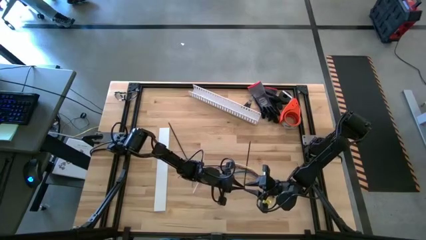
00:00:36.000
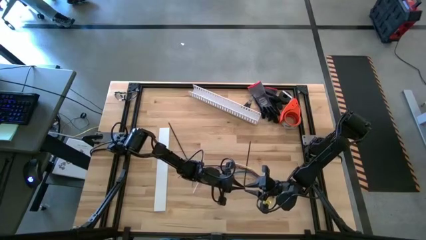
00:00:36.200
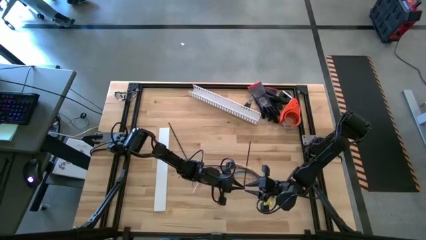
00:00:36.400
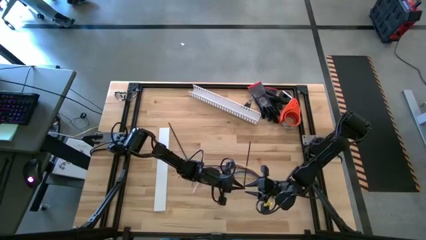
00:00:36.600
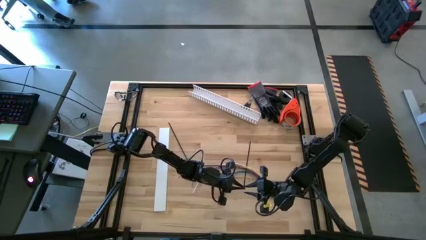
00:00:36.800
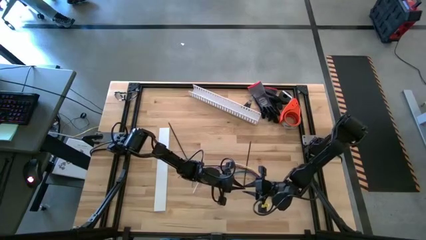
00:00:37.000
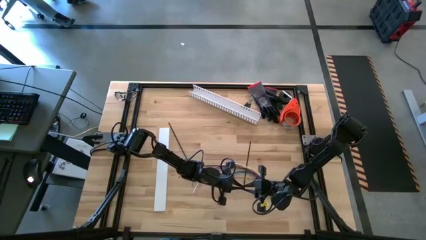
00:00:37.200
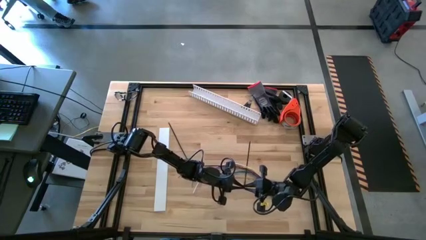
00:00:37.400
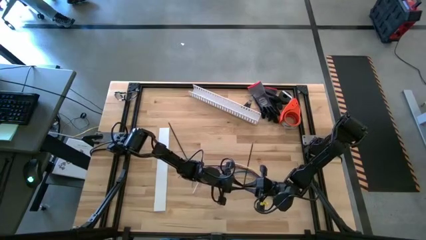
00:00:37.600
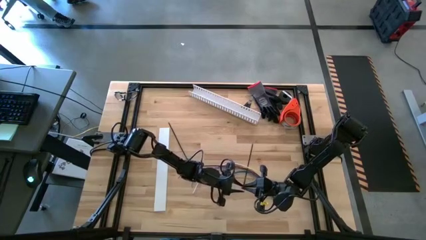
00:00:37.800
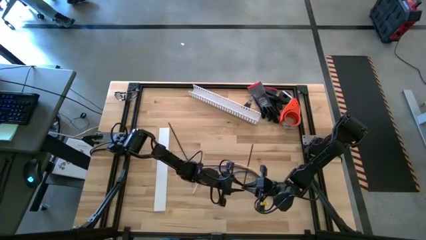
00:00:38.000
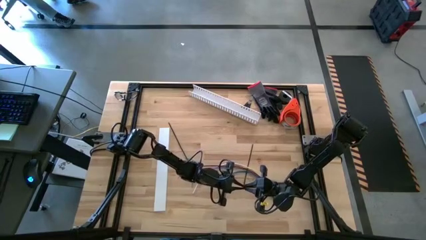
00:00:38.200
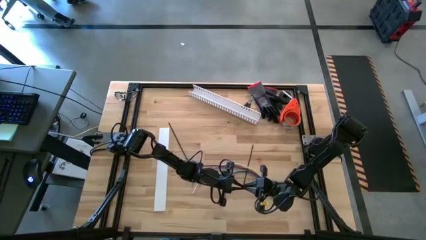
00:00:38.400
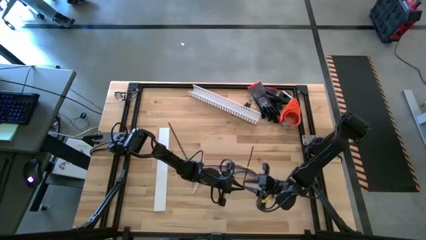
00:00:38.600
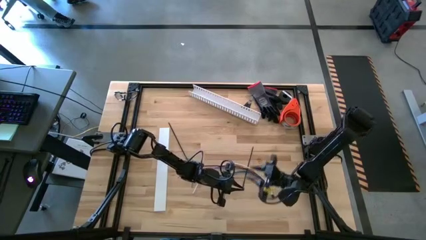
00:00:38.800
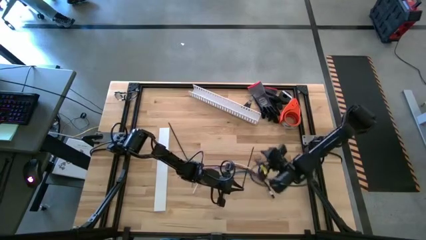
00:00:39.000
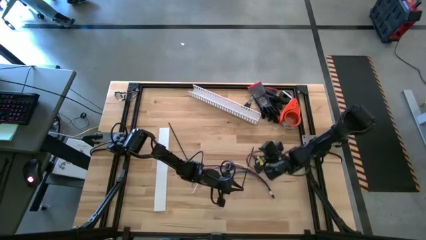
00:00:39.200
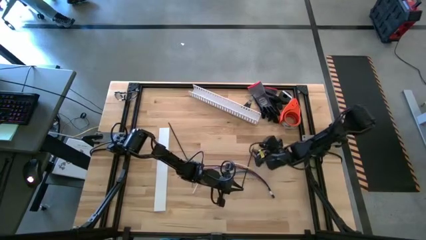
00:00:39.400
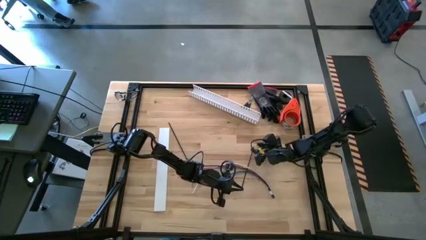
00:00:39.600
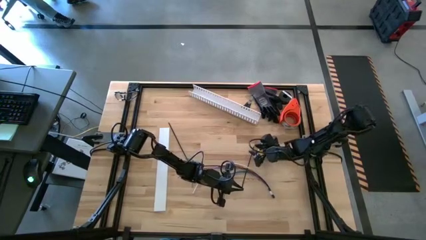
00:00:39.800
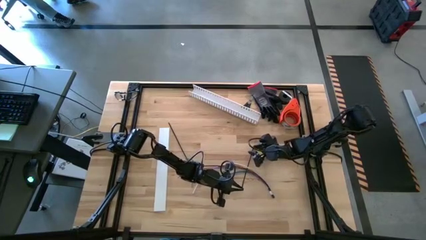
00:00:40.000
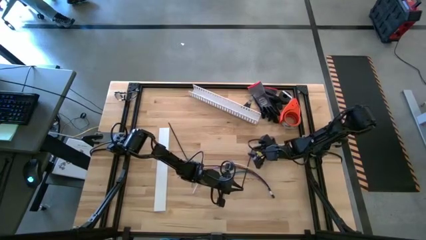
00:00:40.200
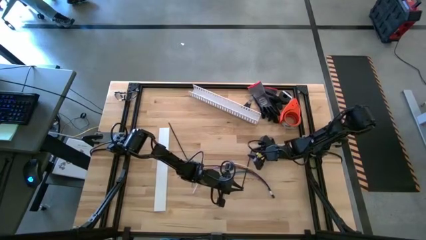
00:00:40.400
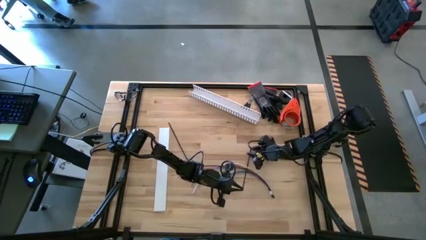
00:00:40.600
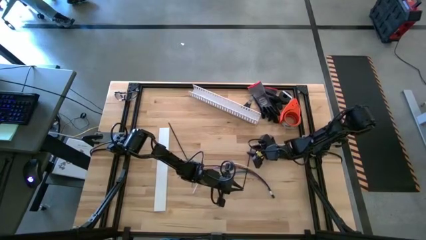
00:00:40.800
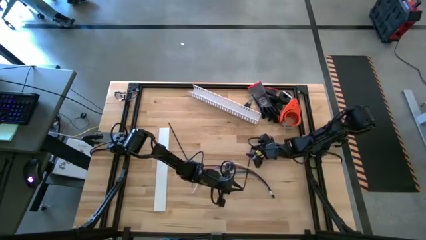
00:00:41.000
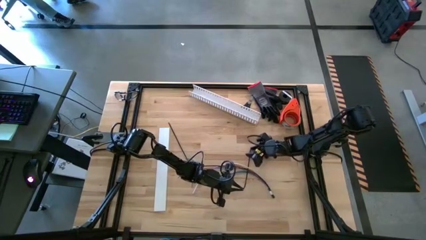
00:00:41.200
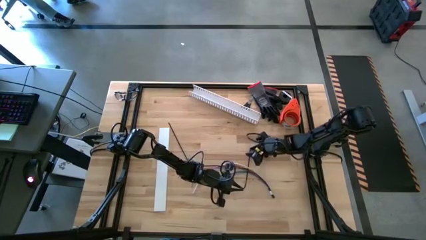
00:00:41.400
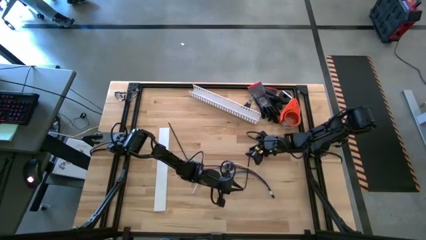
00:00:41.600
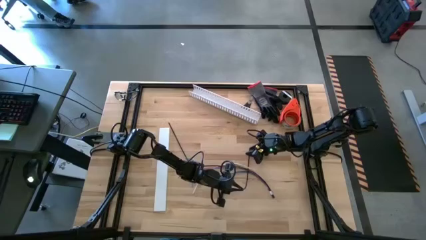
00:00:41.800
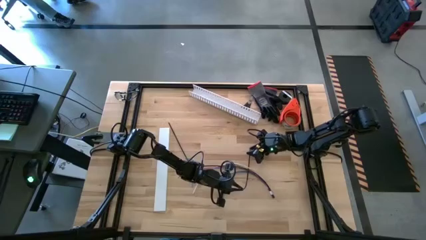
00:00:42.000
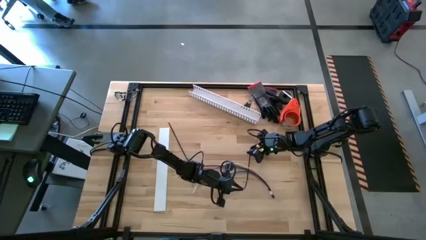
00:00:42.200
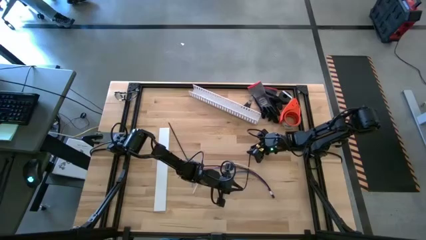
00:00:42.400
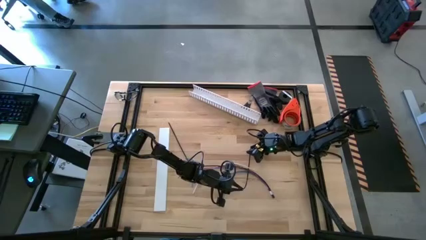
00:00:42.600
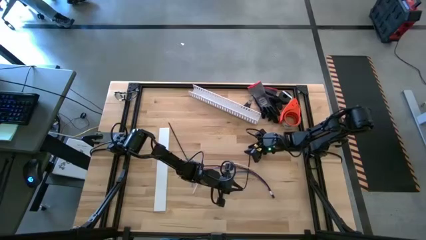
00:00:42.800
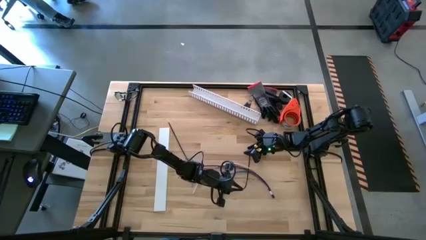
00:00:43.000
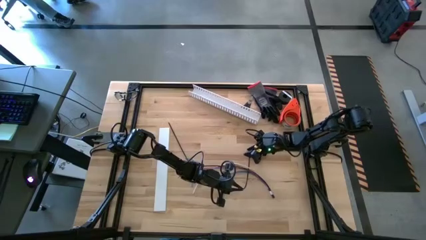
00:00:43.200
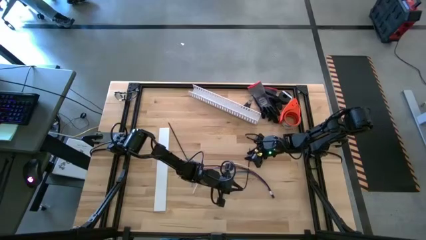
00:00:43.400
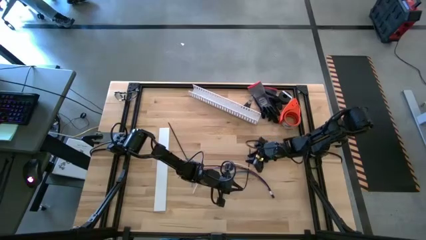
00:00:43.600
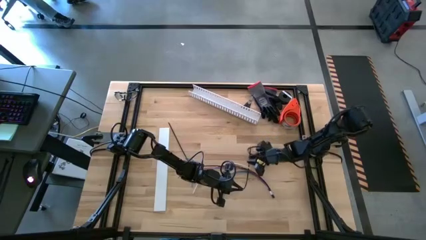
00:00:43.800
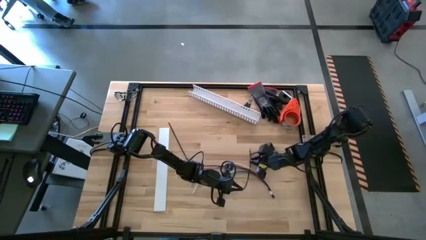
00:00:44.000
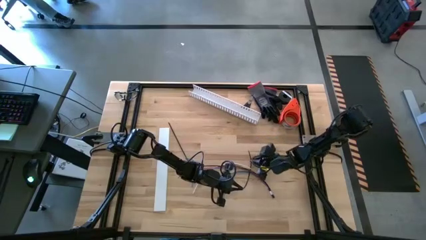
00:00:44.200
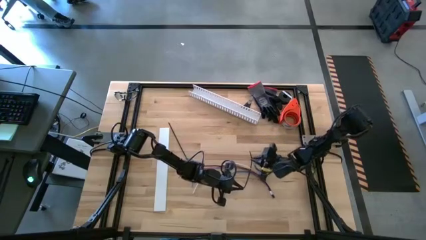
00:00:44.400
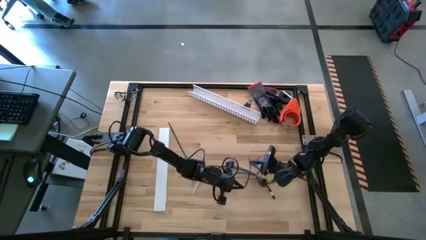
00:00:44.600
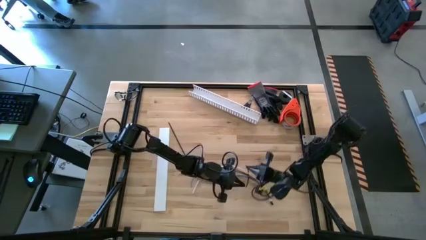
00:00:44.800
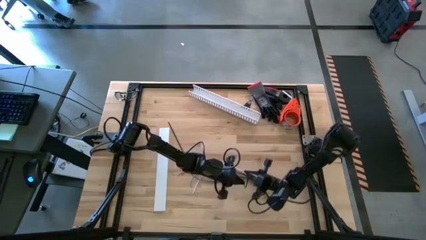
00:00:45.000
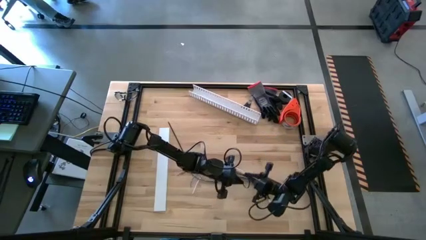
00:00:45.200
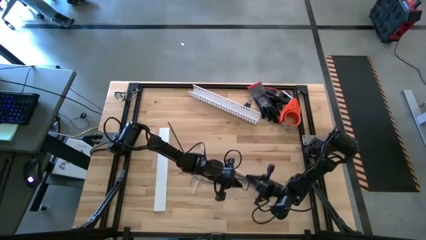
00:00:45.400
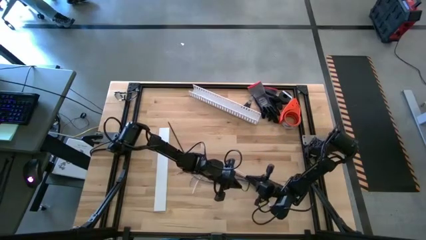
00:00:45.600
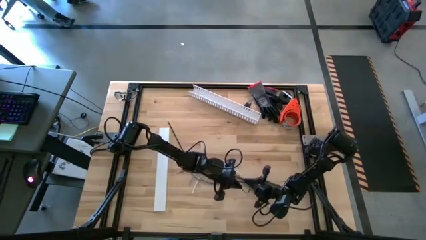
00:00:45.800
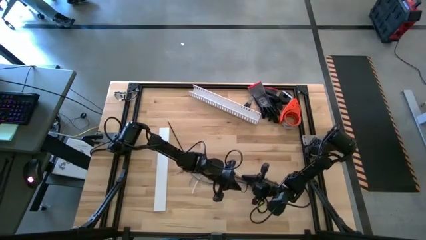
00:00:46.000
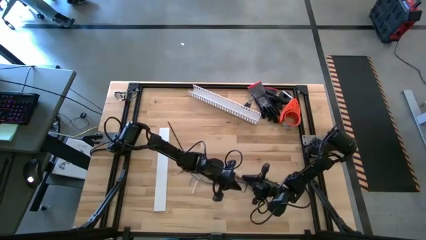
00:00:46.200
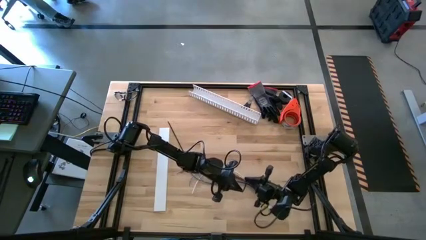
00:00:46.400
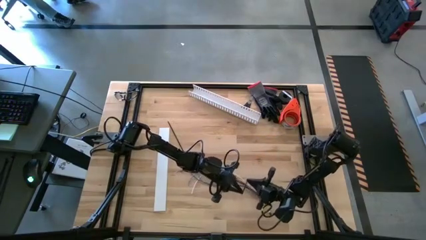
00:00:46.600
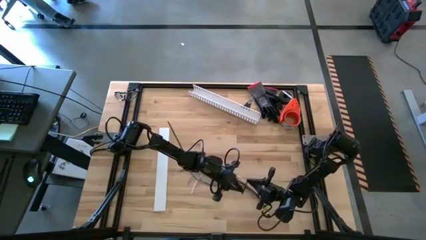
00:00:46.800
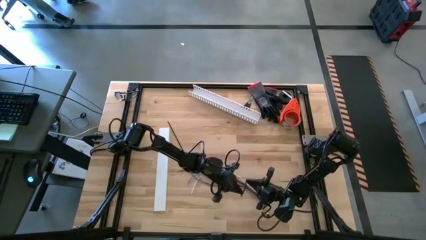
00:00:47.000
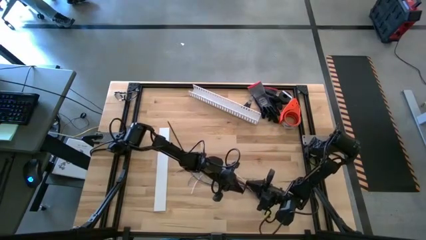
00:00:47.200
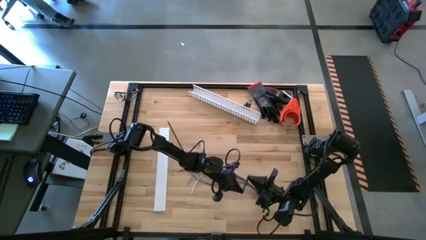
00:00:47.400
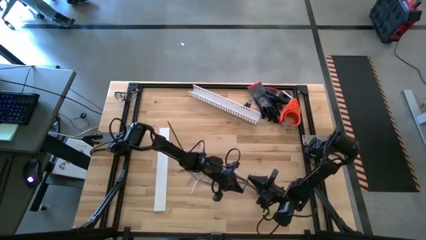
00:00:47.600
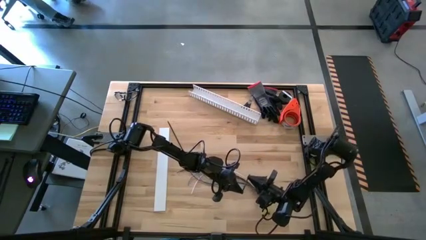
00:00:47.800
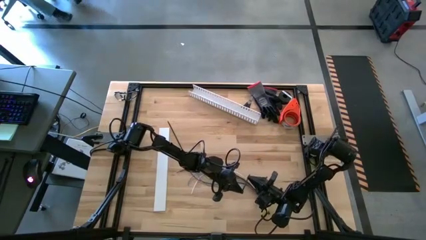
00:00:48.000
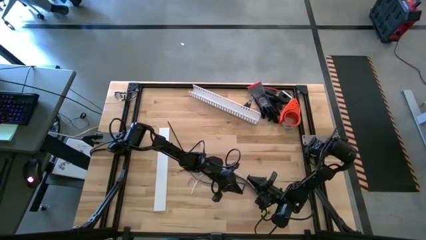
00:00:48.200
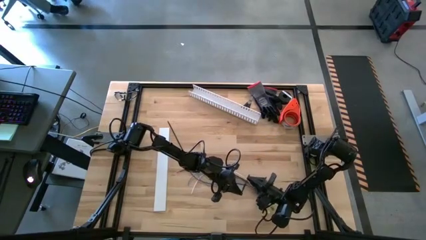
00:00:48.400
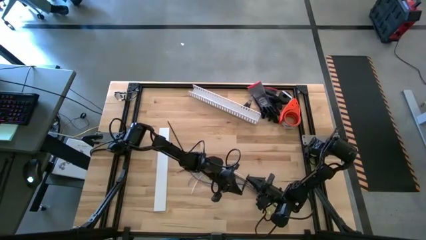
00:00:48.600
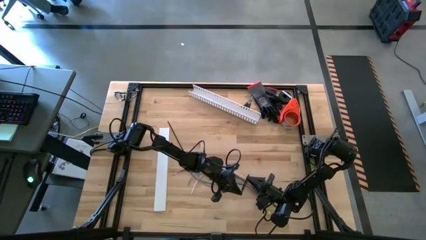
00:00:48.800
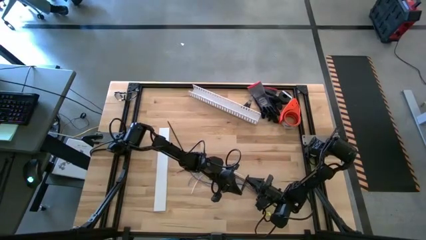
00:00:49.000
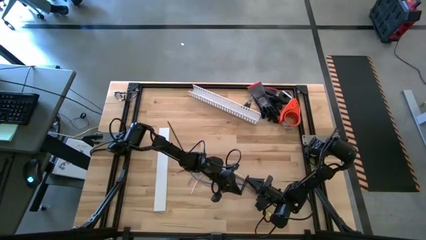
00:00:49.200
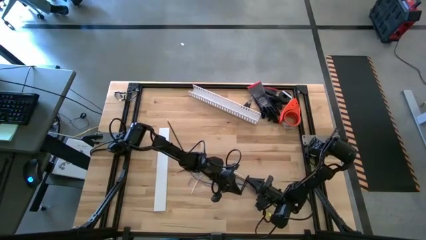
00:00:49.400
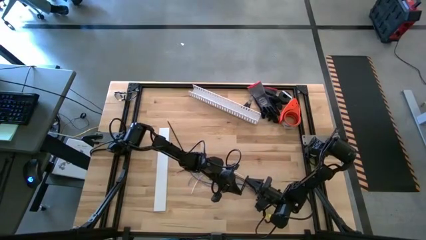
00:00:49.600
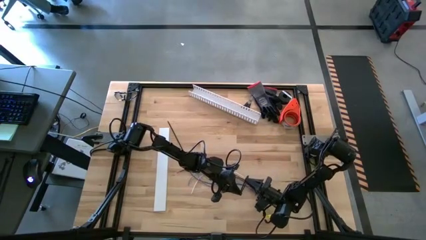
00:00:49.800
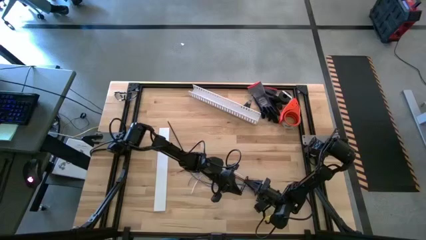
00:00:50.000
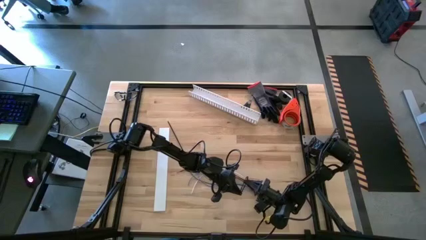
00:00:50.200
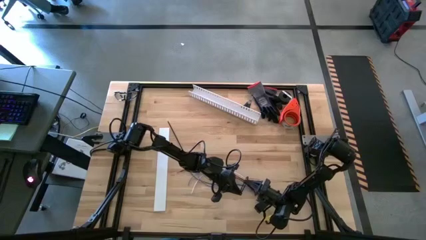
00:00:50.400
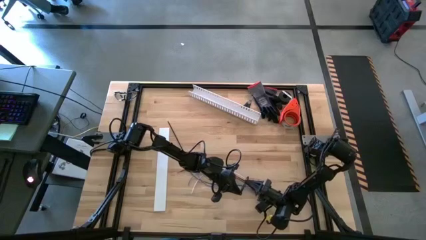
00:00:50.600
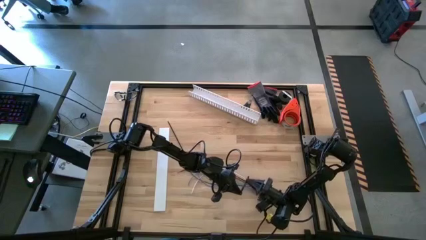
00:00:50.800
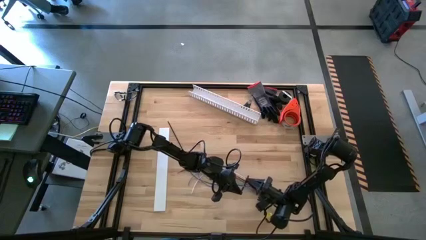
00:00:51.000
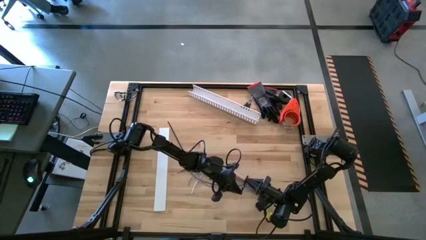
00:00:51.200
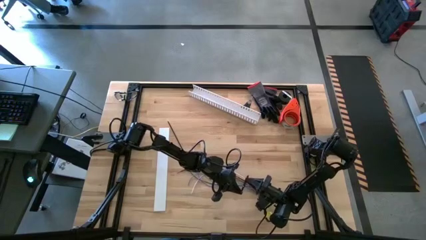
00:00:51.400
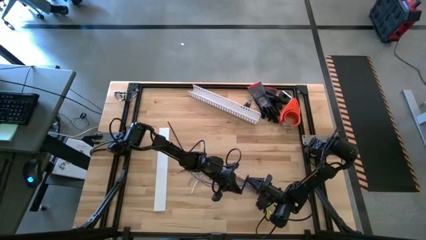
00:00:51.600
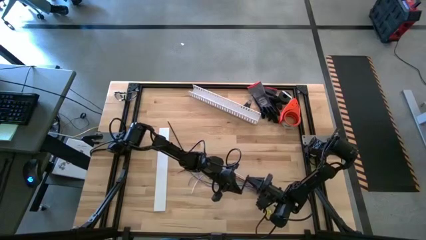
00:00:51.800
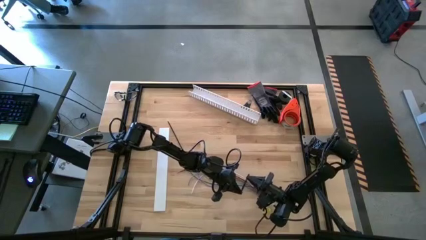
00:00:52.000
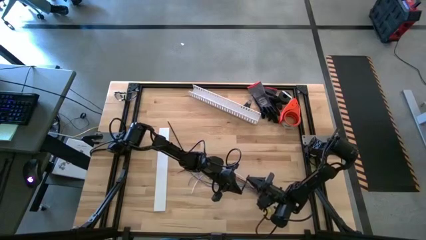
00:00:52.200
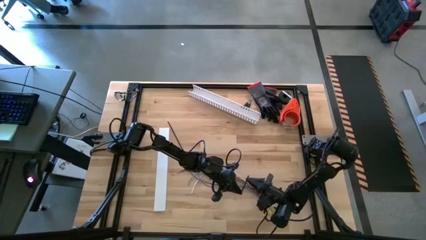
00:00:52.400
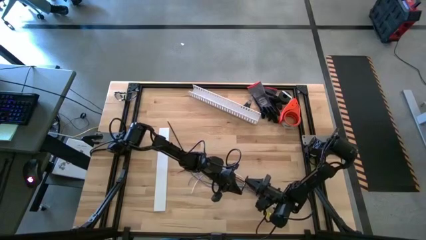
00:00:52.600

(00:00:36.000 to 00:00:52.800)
Task: Ziptie cables
Wrap the right zip tie on the cable
